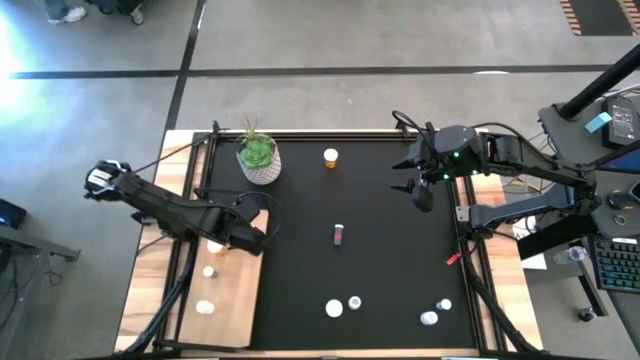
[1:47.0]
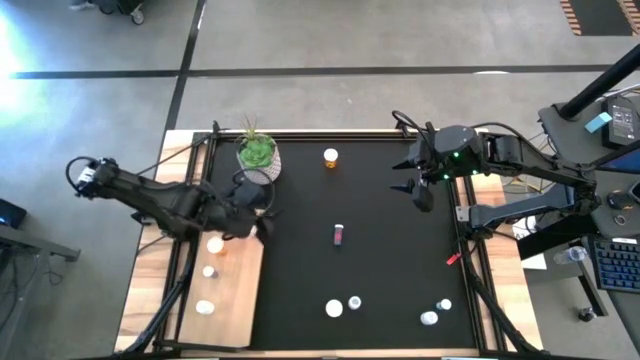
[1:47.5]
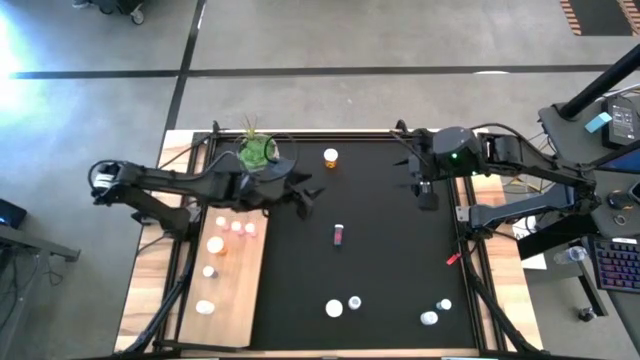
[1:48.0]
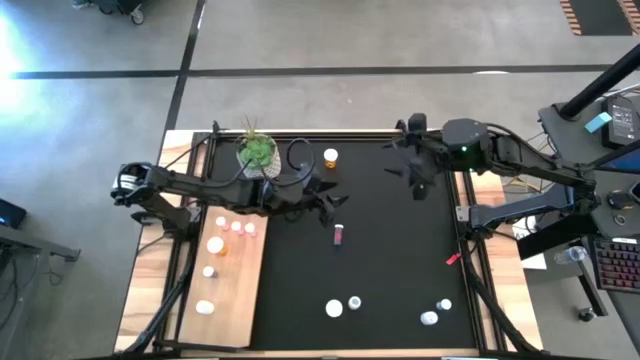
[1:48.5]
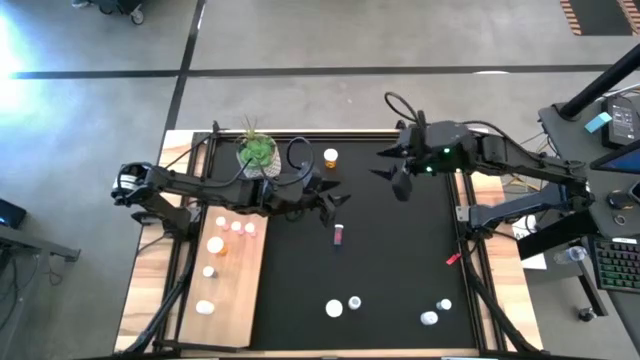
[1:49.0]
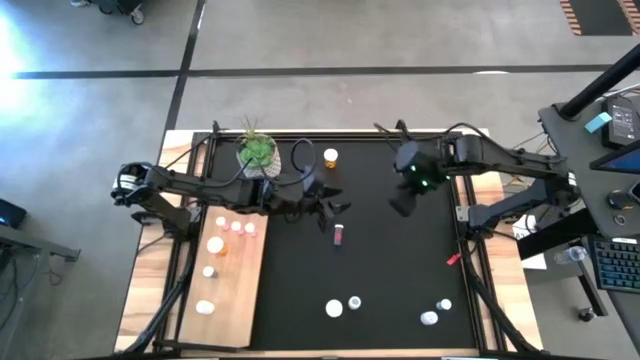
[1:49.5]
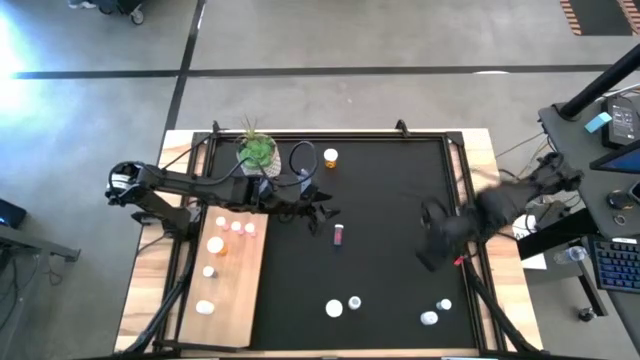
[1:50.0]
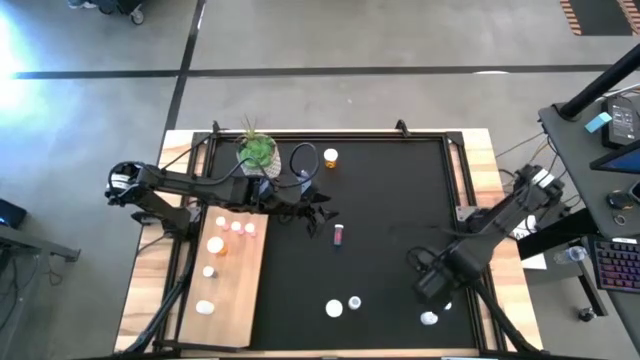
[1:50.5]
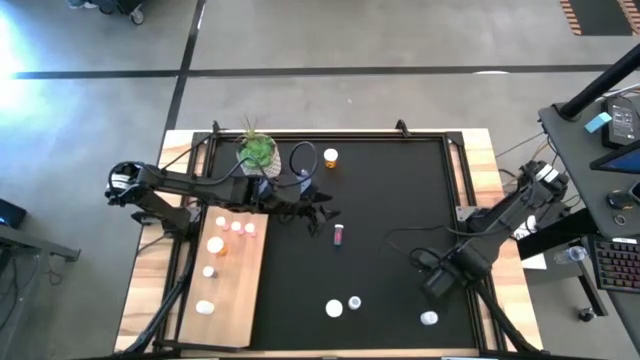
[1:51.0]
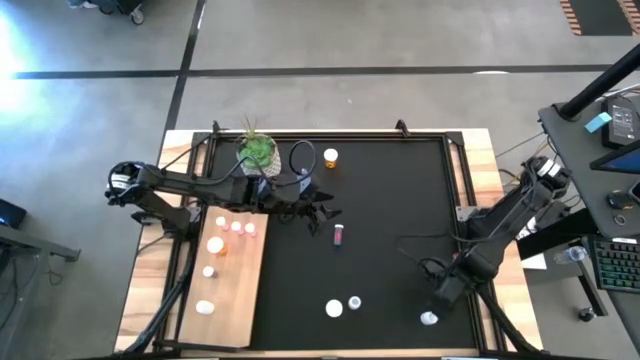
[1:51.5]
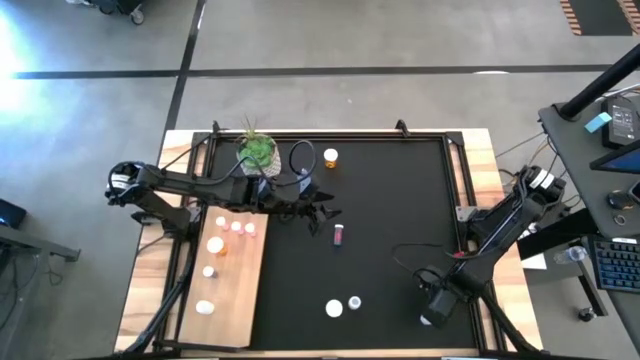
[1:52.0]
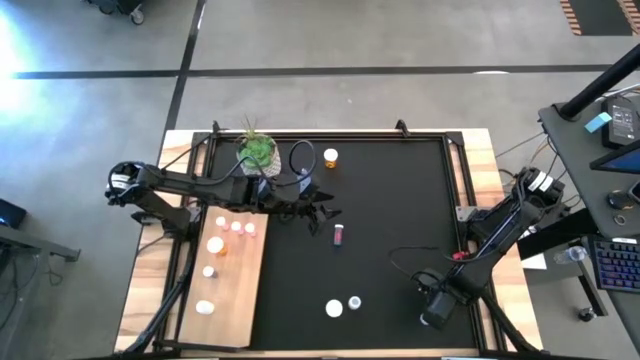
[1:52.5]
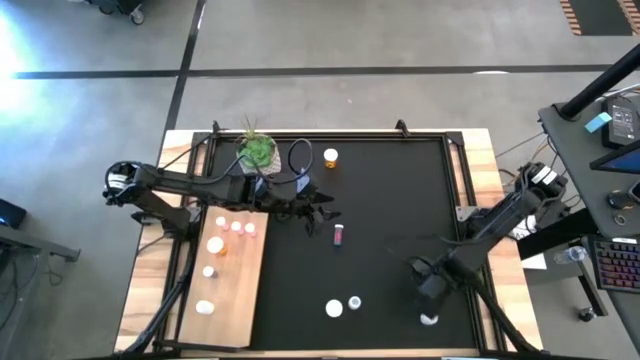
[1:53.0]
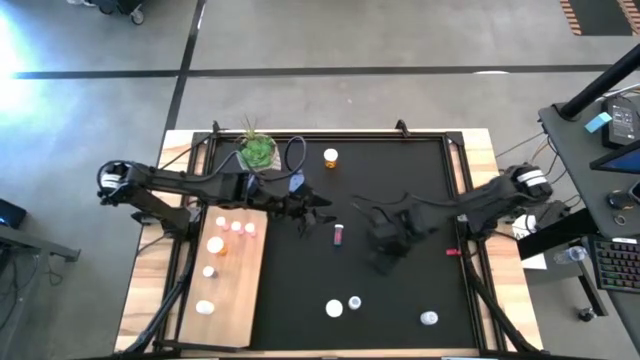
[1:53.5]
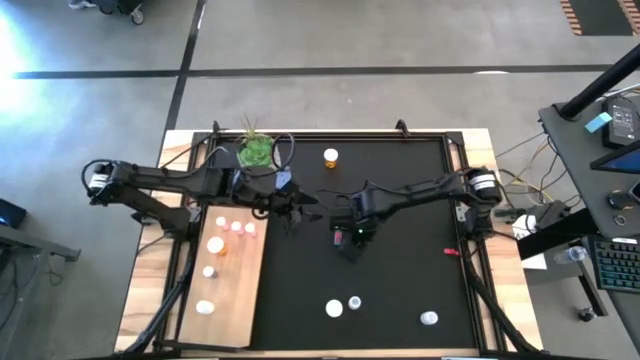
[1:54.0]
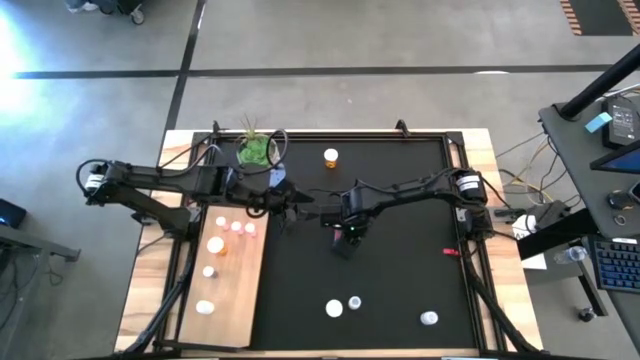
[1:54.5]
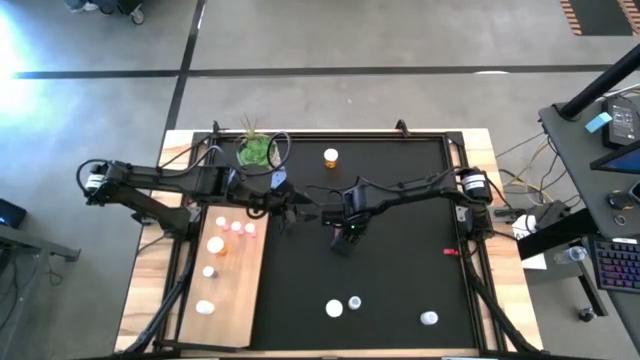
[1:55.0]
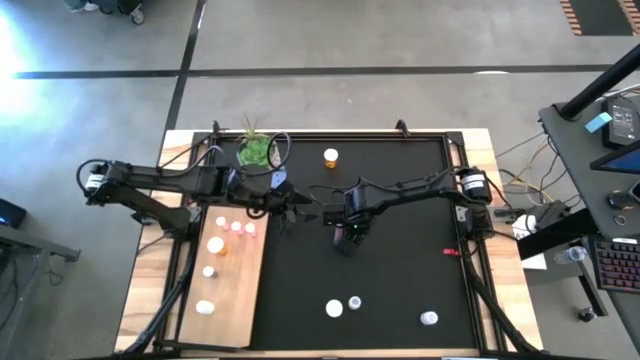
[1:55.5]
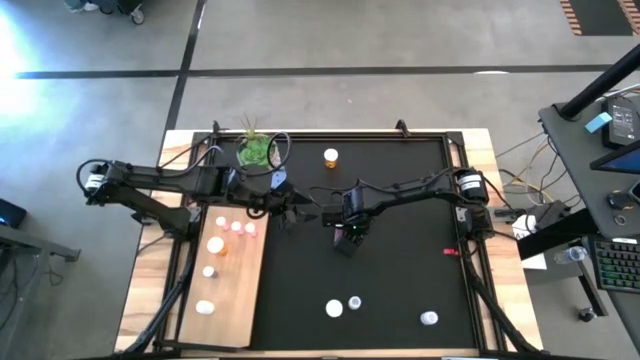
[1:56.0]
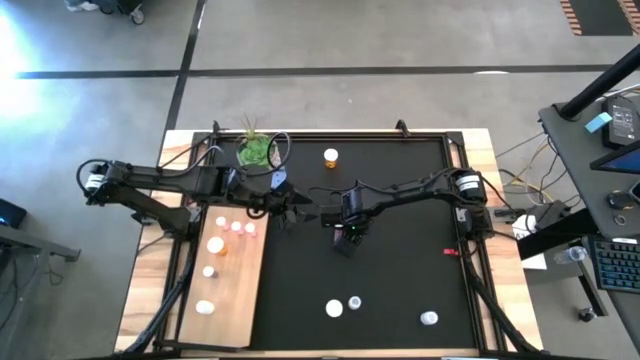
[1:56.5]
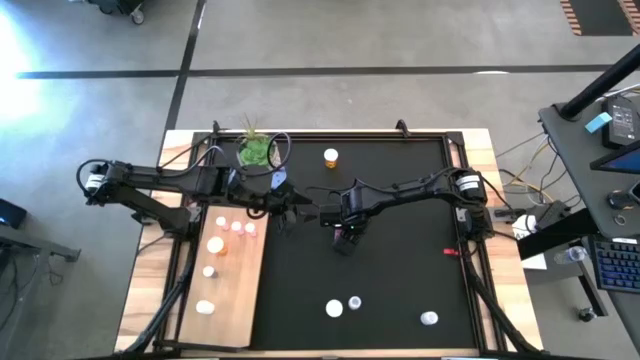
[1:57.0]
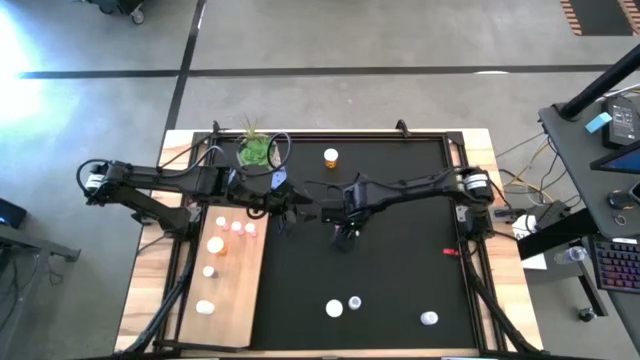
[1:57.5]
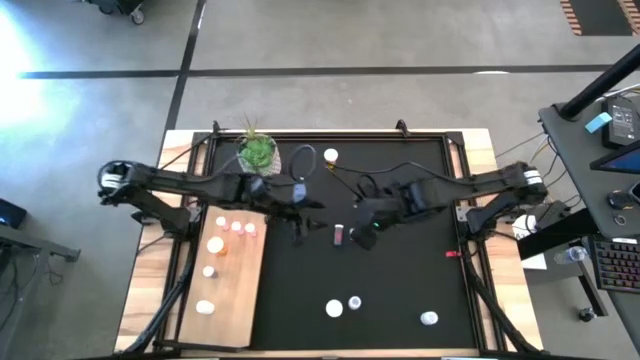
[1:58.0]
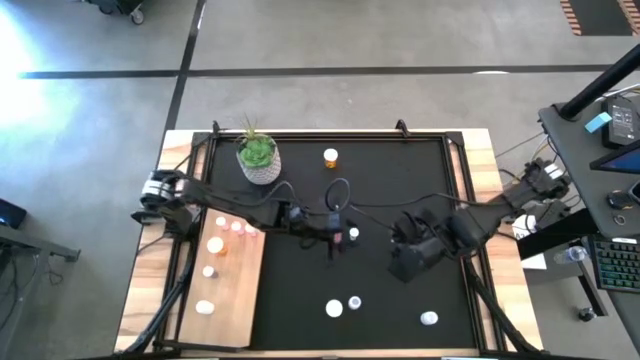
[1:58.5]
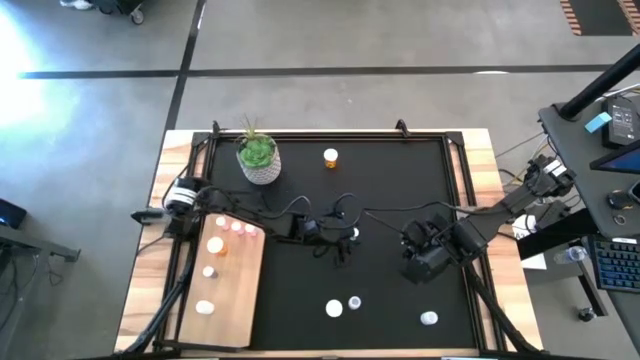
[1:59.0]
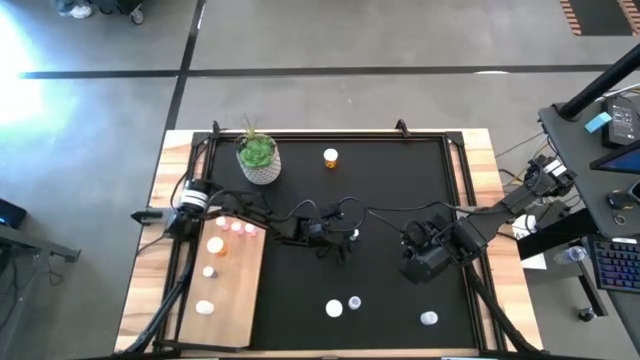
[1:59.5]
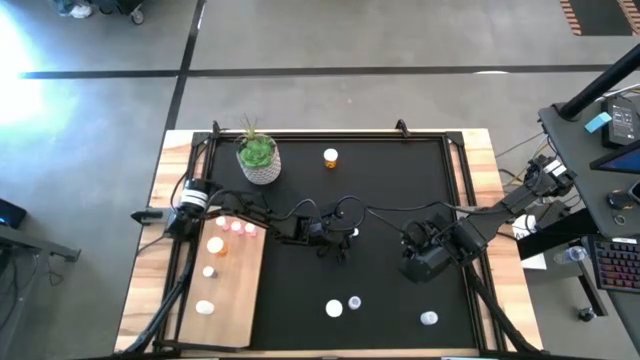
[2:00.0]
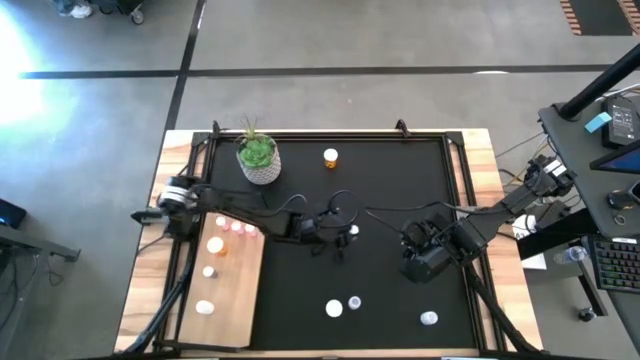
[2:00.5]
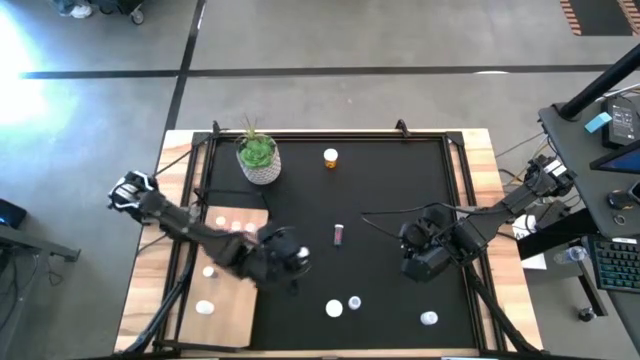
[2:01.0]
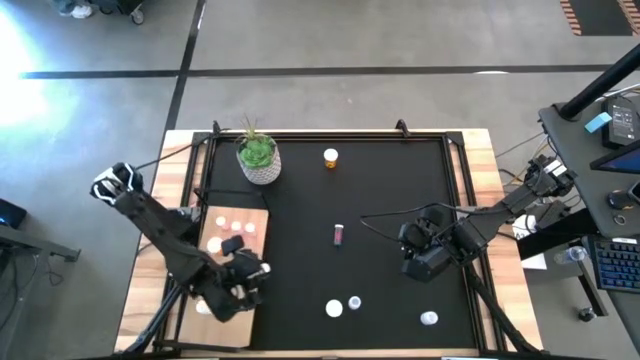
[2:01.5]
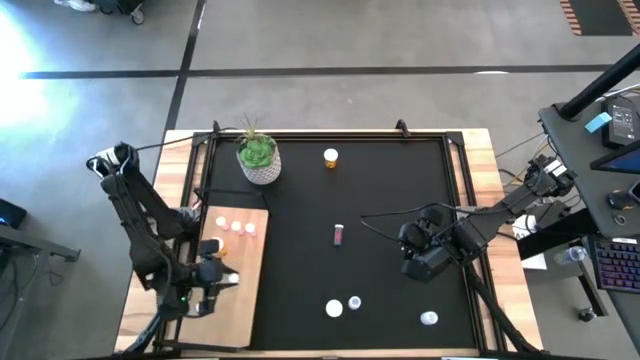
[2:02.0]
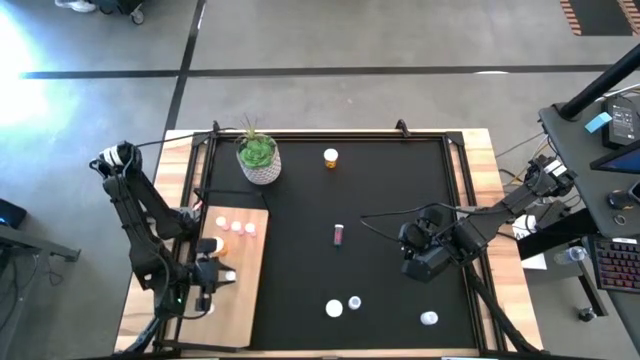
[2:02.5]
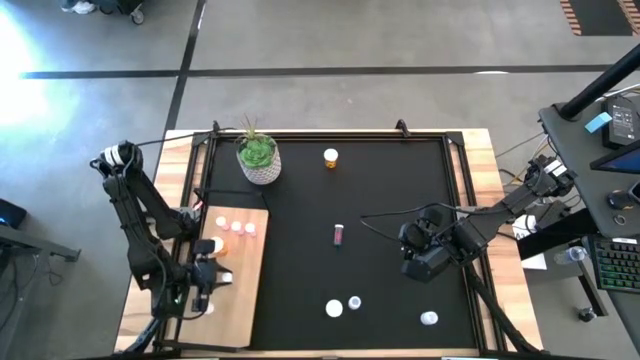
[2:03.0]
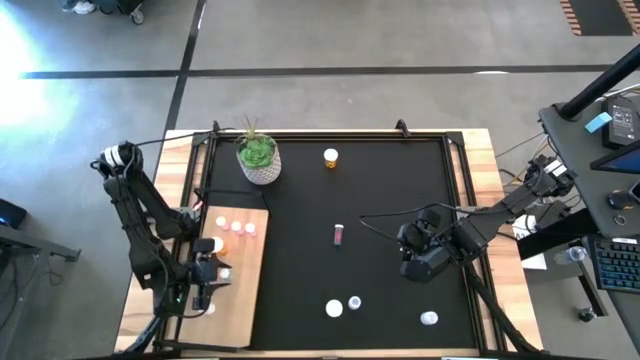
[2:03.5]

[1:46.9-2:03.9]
Task: Pick and place medicine bottles onto shelf by color
Put the bottom blue pill bottle on the shelf aligned with the other blue pill bottle

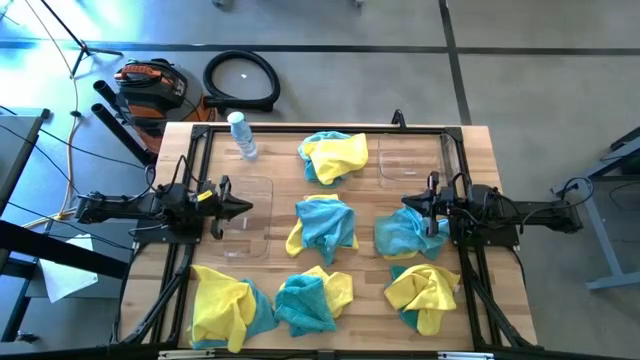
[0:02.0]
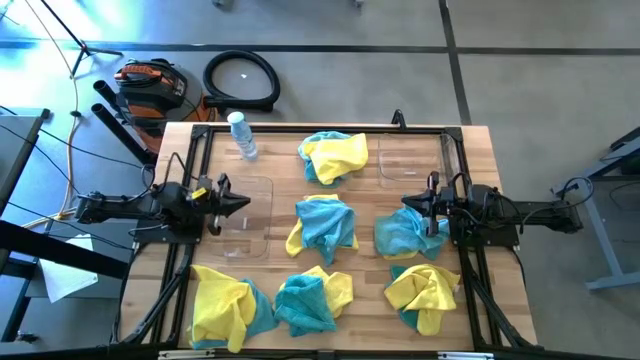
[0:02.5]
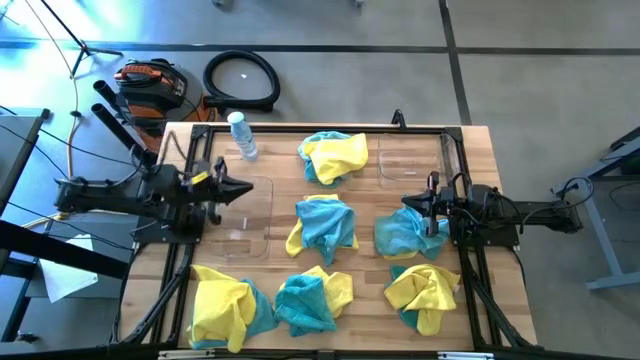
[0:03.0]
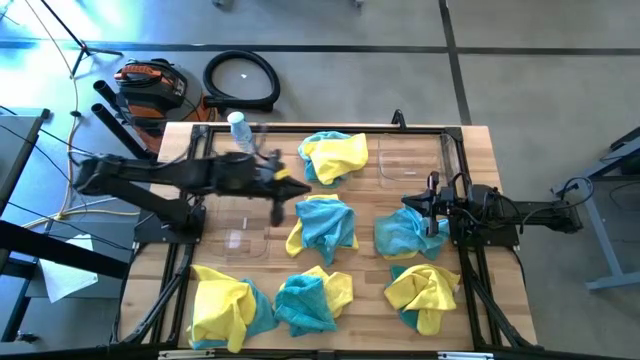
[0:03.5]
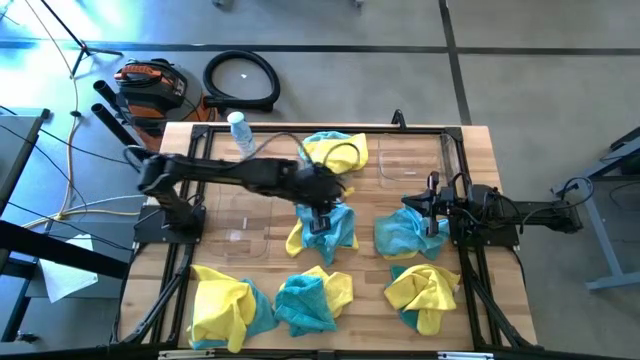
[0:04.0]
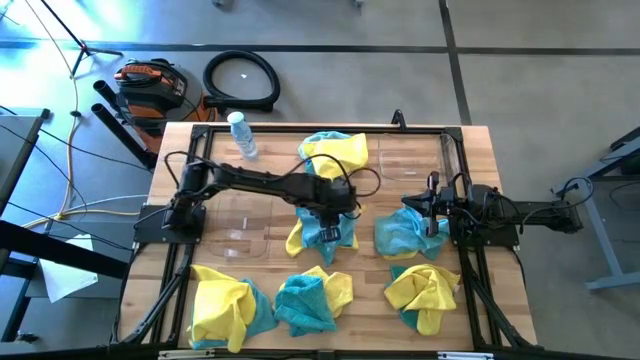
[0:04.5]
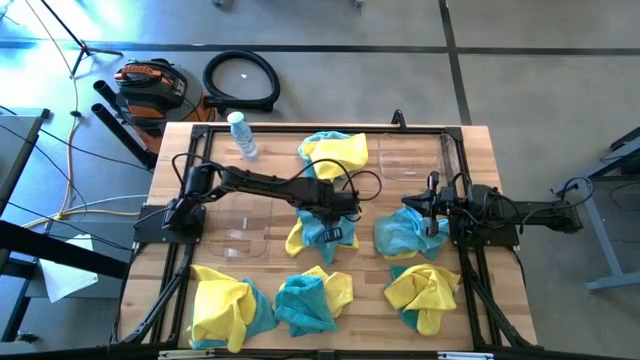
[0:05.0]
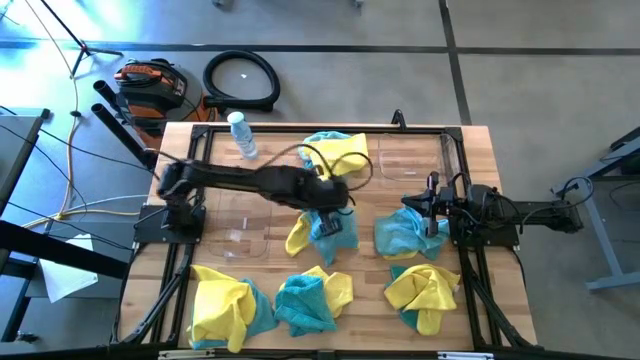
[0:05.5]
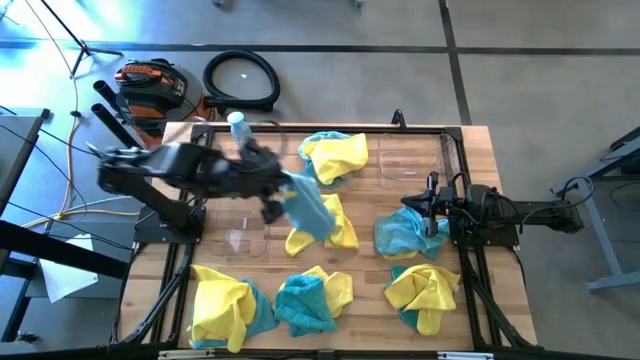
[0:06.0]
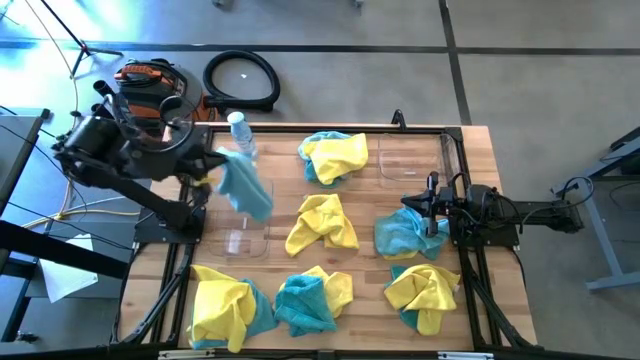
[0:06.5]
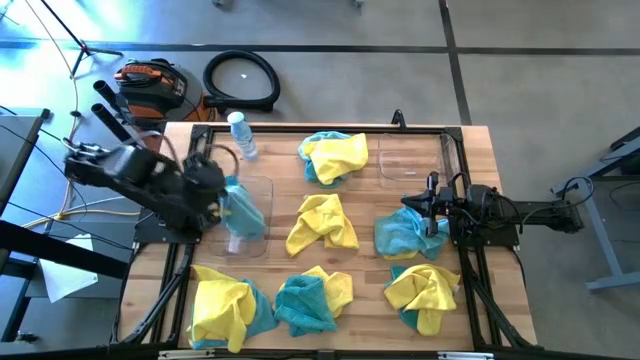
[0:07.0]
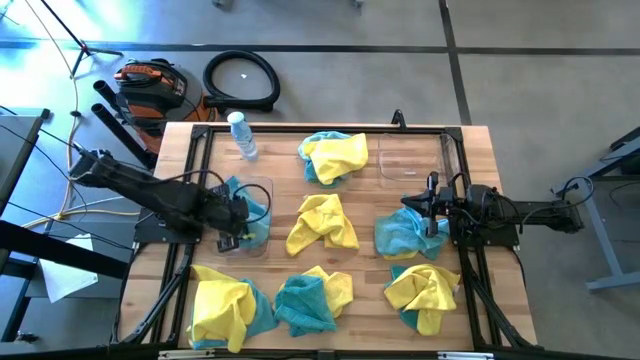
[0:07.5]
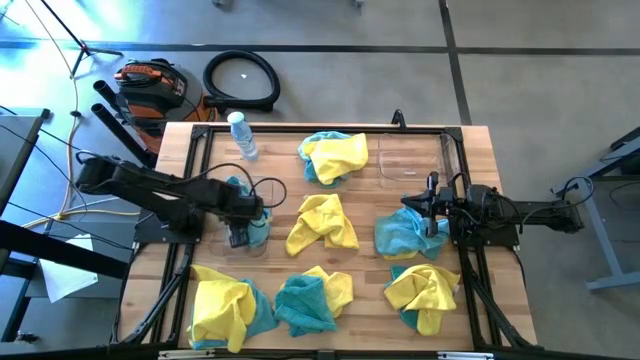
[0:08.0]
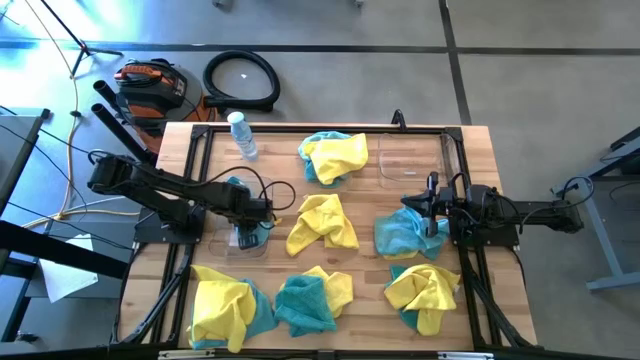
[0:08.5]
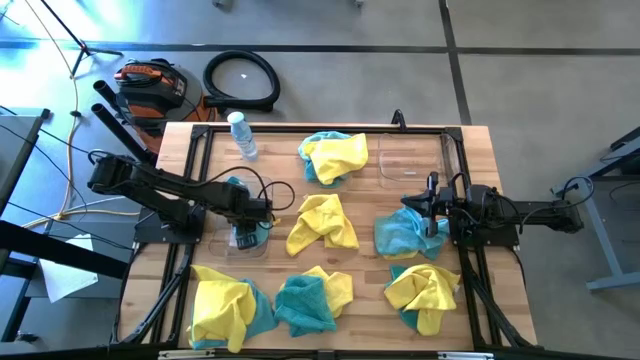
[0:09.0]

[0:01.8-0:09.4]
Task: Sort microfiber towel by color & place in baskets
Put the blue microfiber cloth into the left transparent bin
